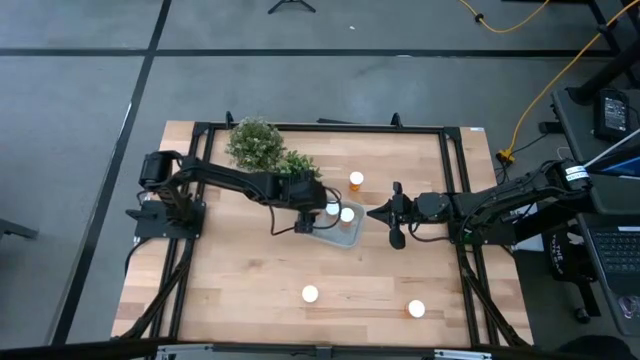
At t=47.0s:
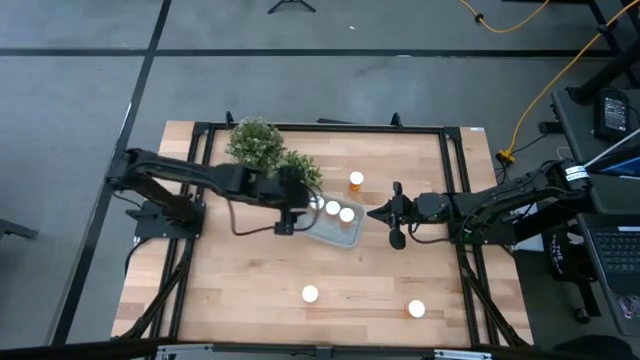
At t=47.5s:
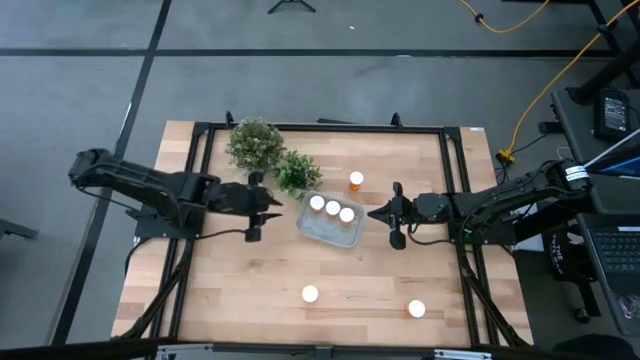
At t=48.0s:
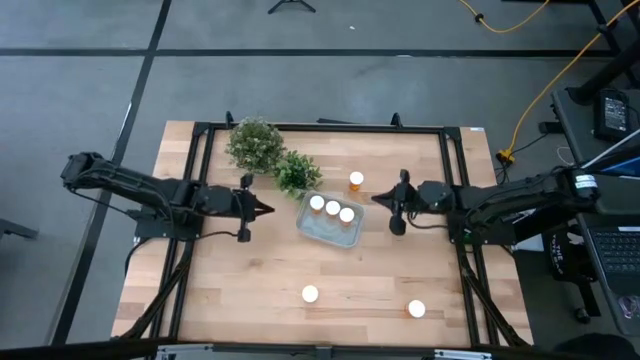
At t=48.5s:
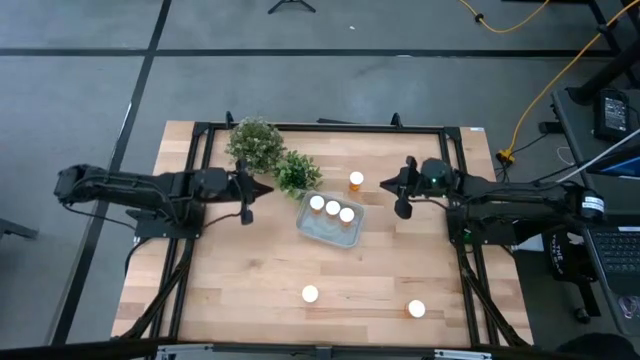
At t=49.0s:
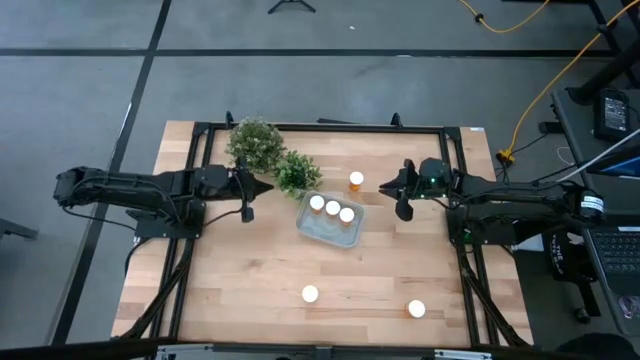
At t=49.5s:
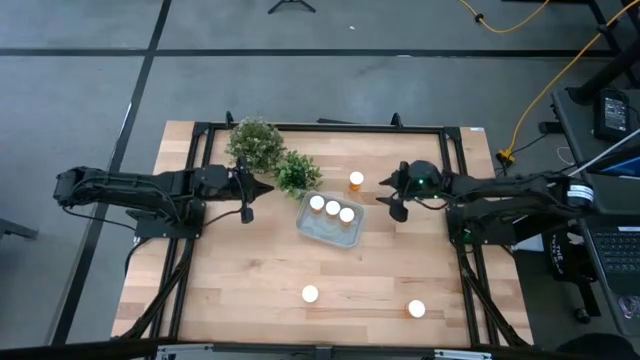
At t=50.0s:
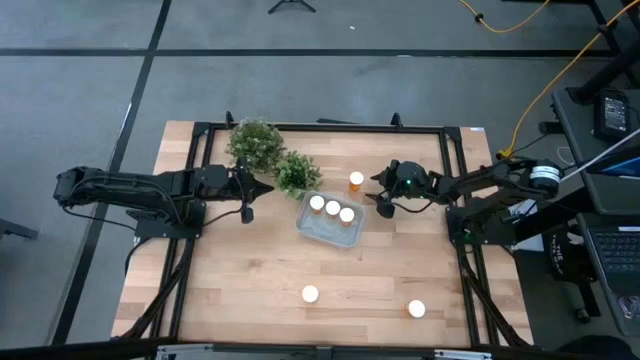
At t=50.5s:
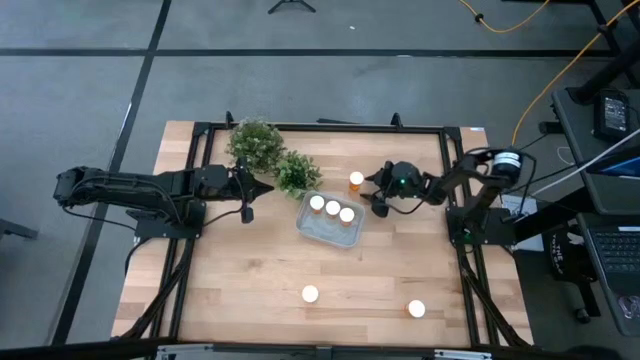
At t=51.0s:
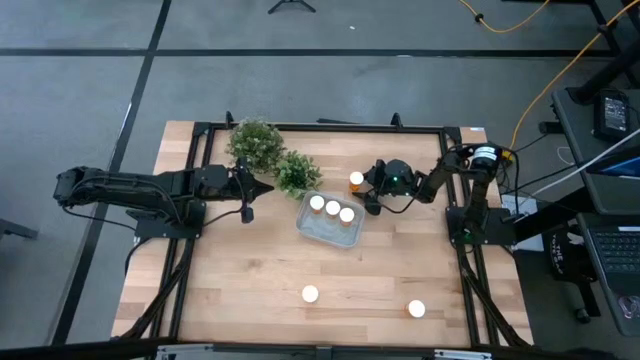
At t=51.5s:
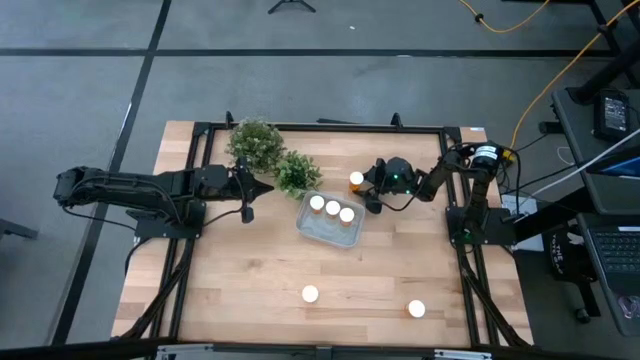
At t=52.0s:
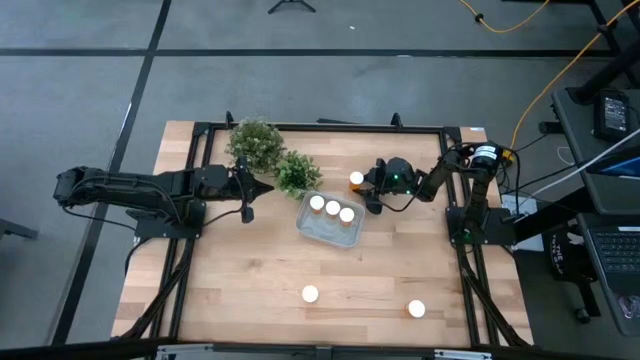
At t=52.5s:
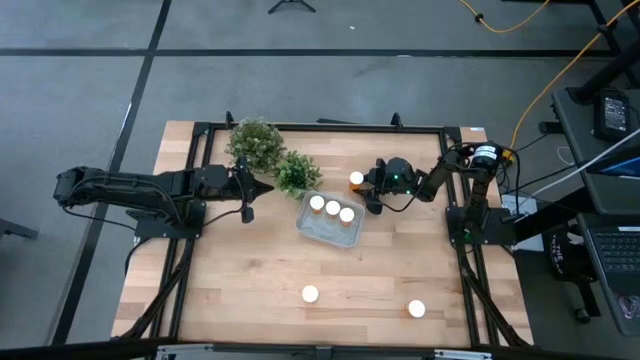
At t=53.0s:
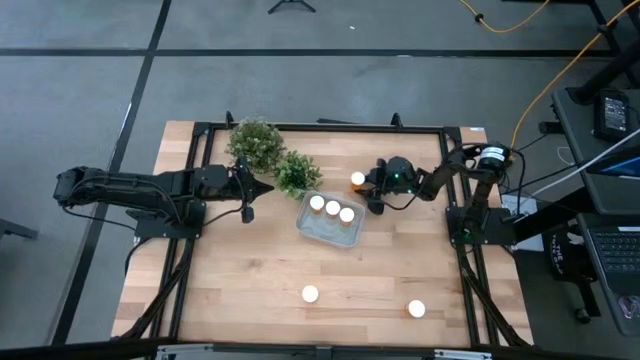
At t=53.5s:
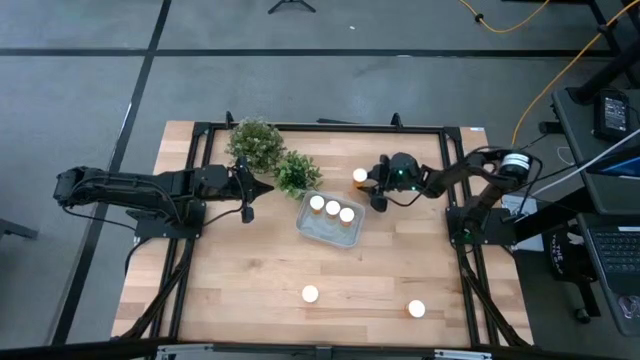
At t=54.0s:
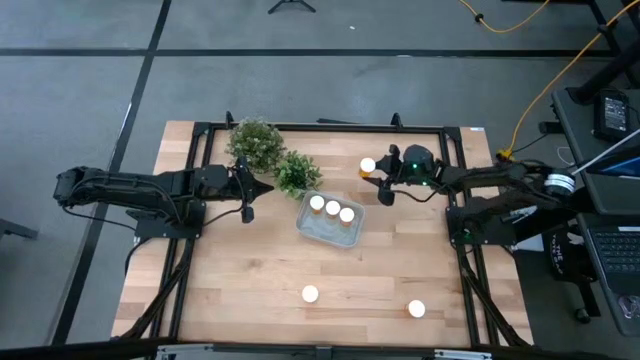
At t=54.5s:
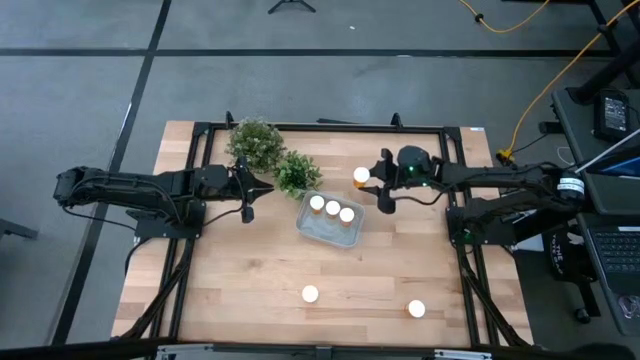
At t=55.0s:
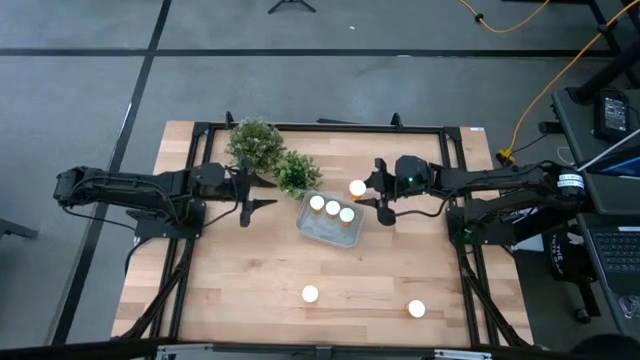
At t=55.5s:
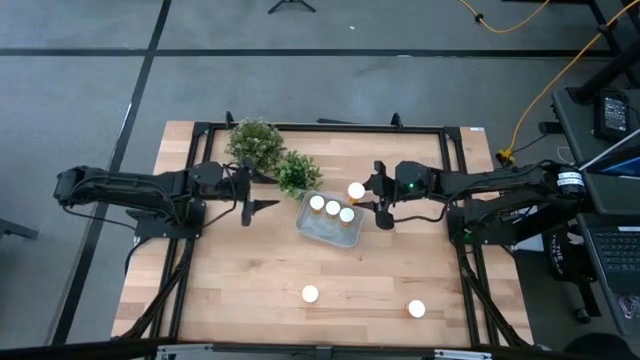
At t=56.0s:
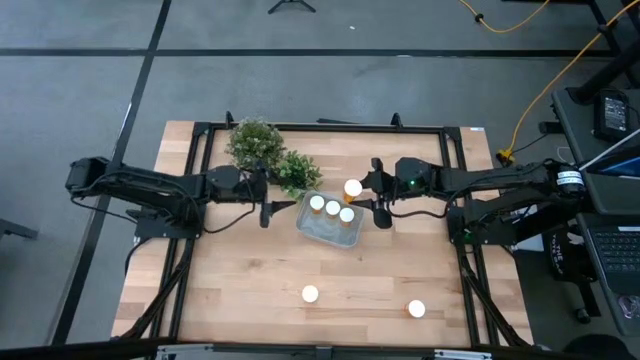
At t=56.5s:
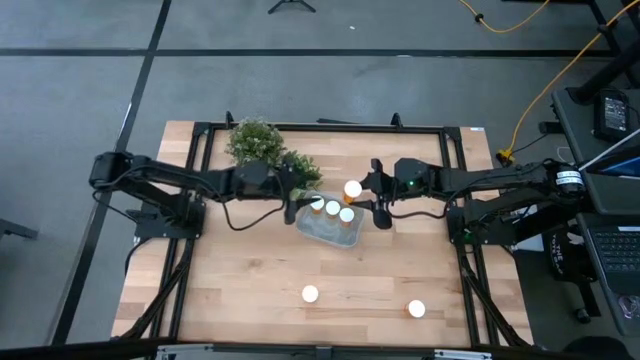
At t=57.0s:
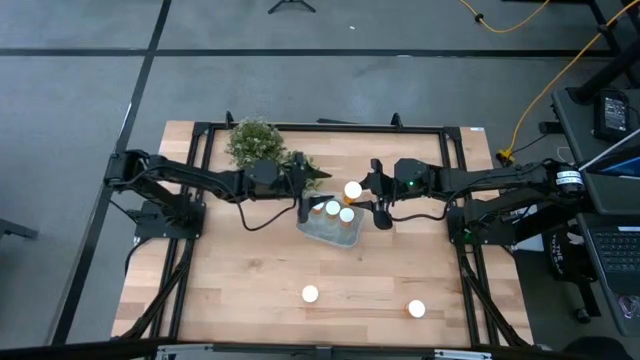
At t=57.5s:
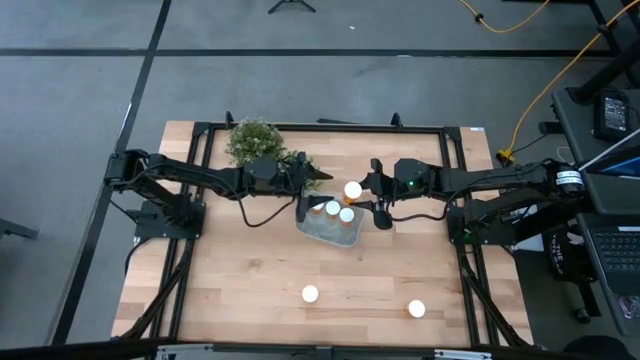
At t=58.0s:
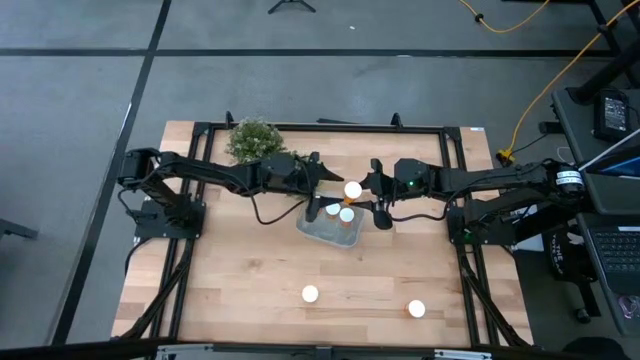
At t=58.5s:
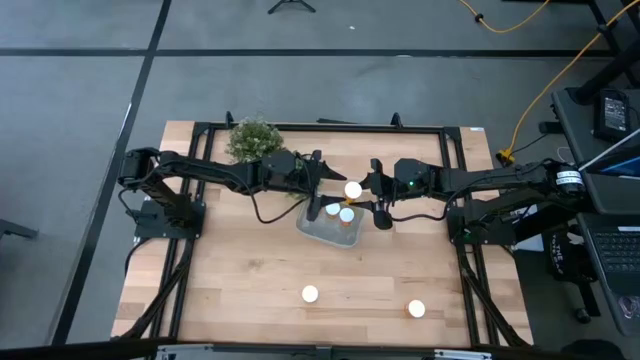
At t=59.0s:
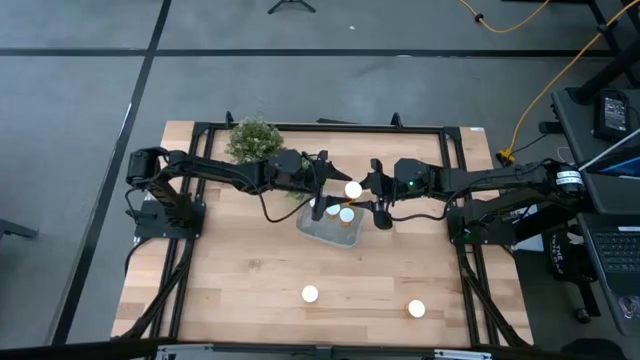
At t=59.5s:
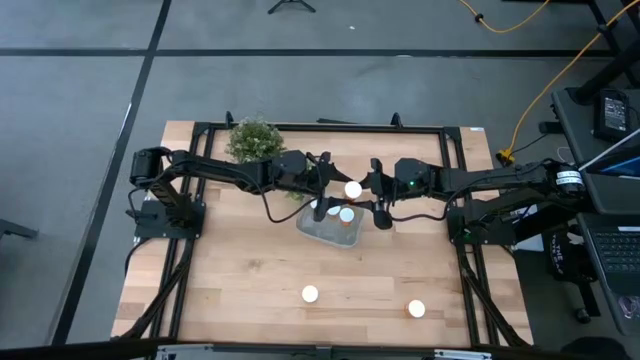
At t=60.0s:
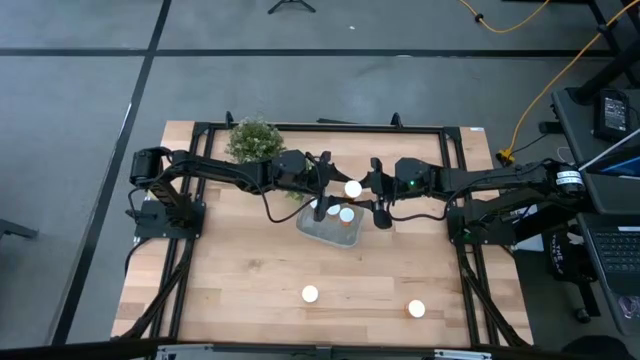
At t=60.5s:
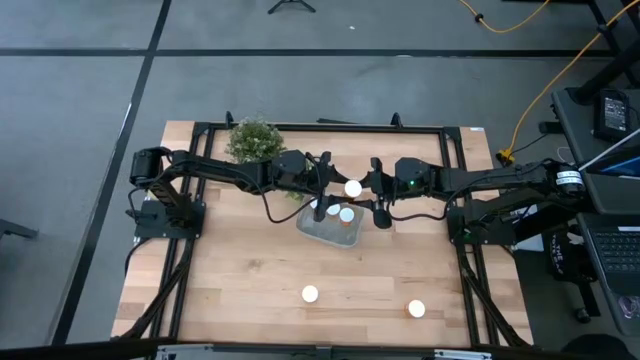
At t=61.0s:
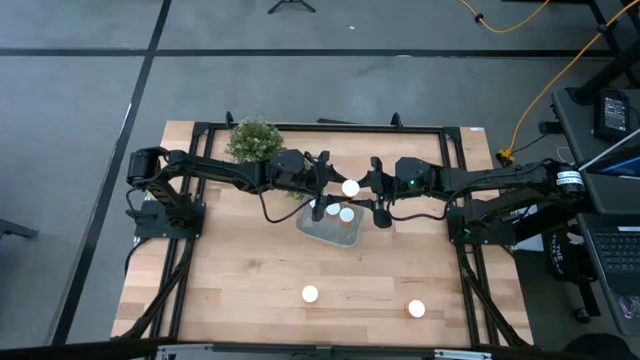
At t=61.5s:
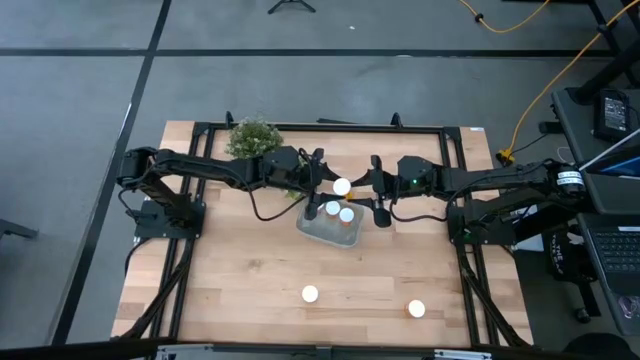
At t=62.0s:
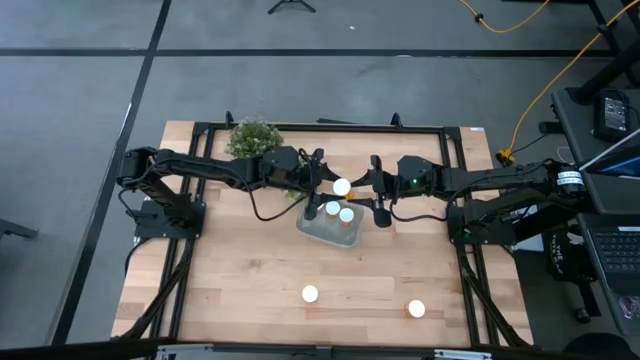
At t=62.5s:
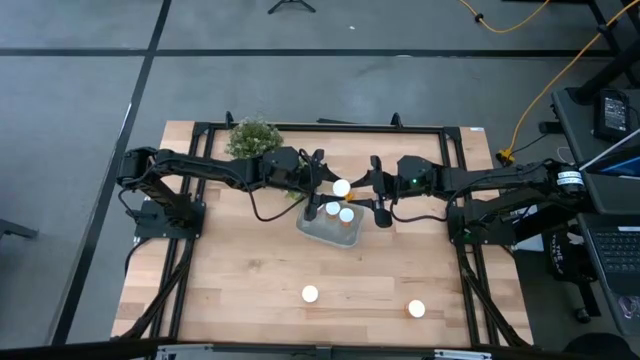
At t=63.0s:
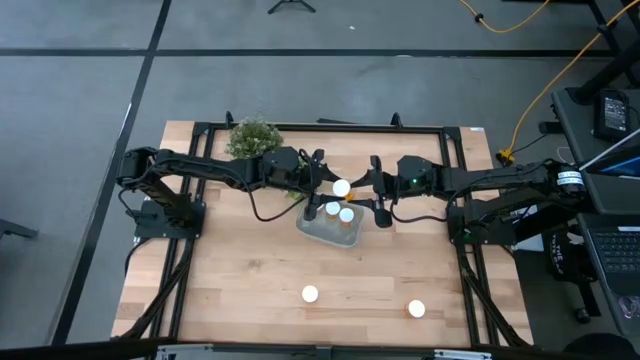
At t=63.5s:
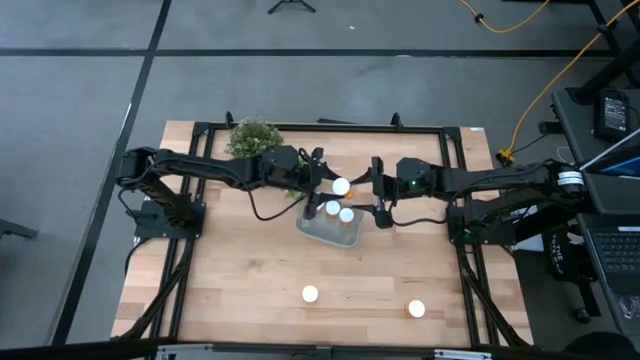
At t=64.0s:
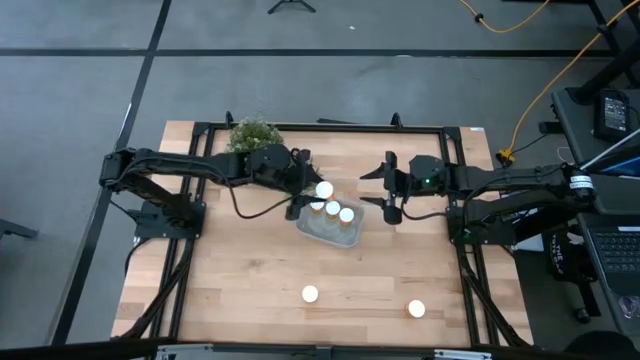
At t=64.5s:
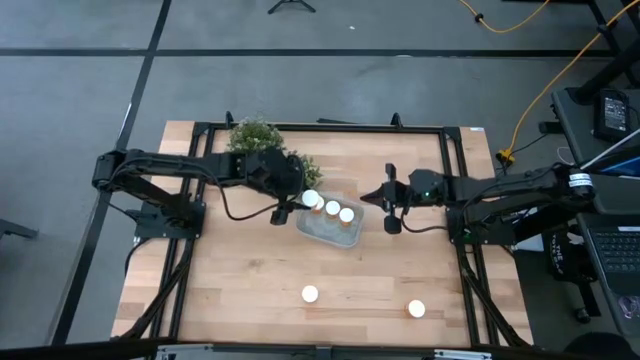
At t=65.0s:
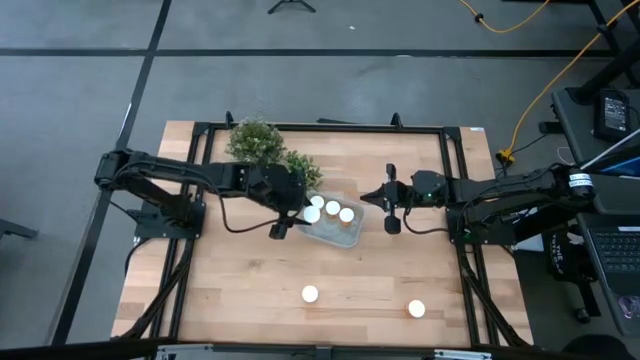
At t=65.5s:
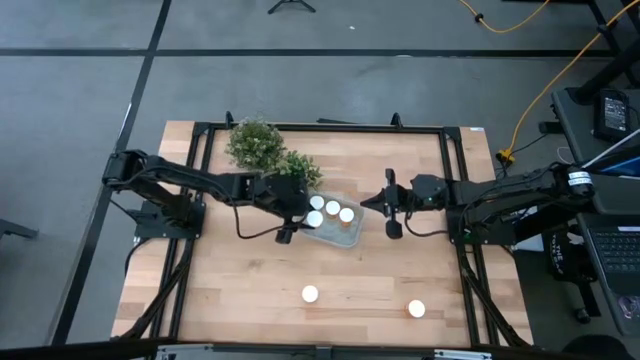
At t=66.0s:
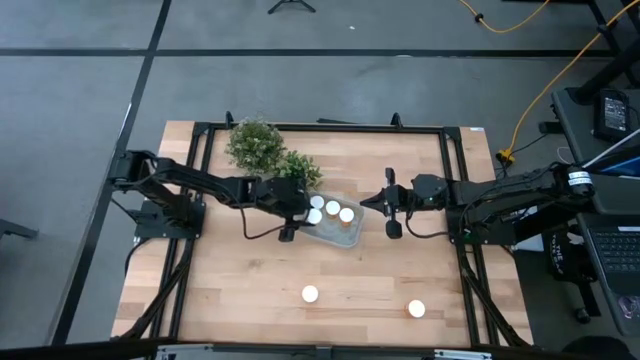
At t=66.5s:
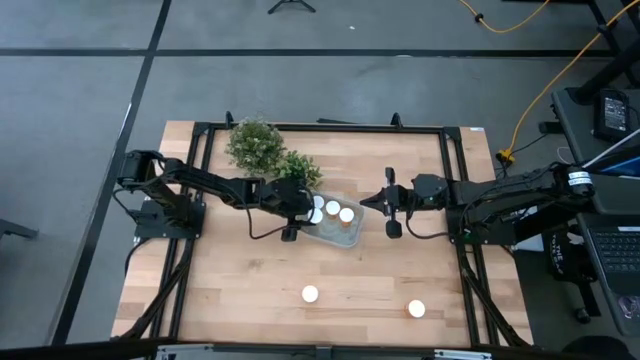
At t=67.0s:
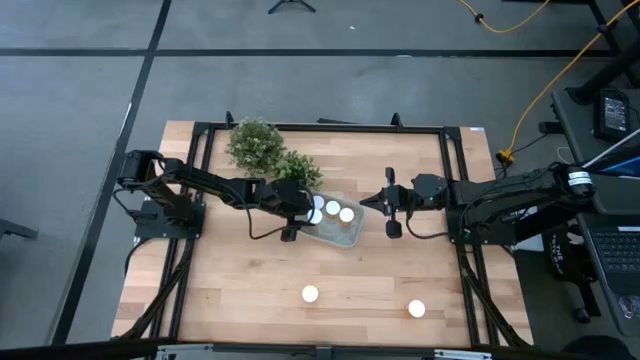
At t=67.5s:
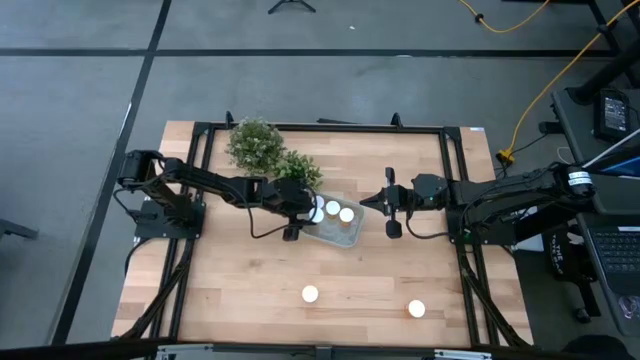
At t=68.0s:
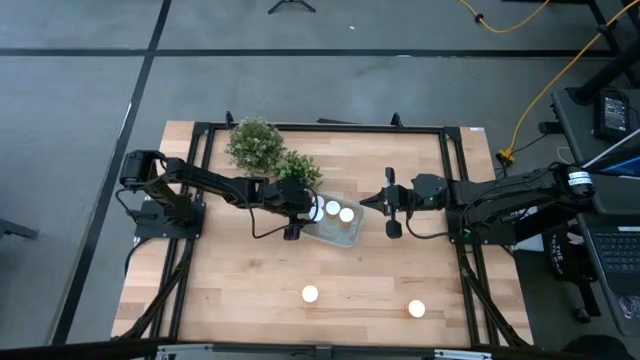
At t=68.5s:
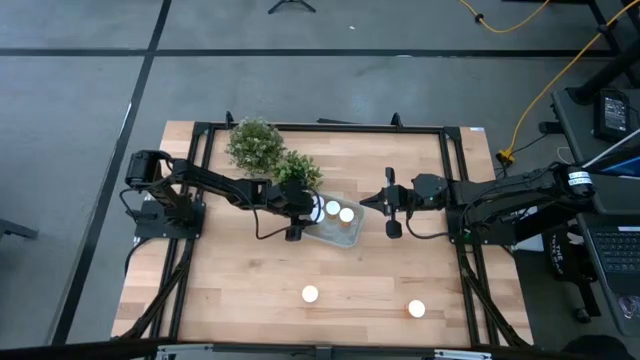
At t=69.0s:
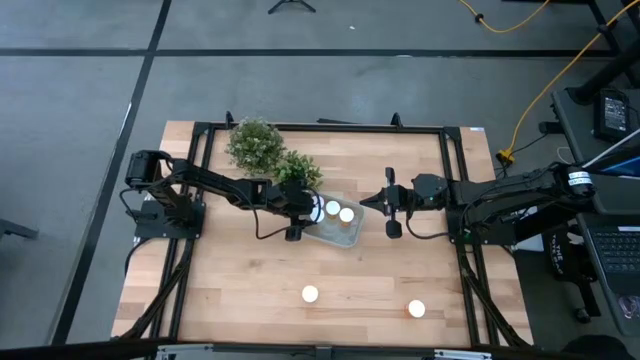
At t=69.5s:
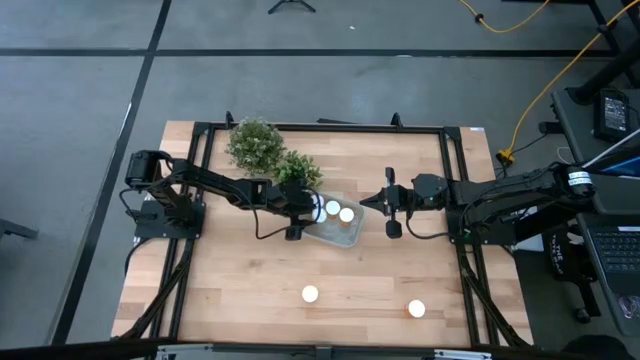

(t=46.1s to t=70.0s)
Task: Pick and place pill bottles into a basket
Put the orange pill bottle into the grey bin
